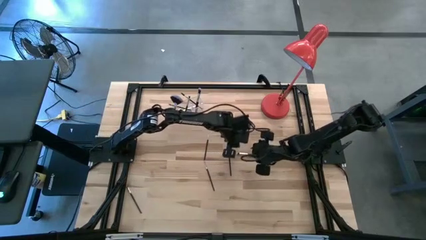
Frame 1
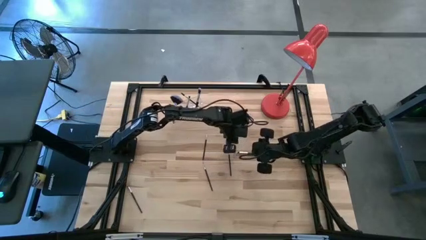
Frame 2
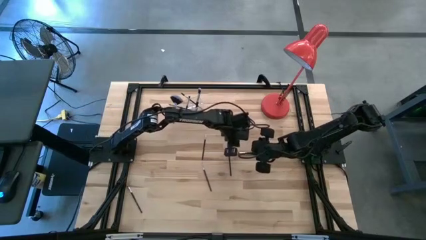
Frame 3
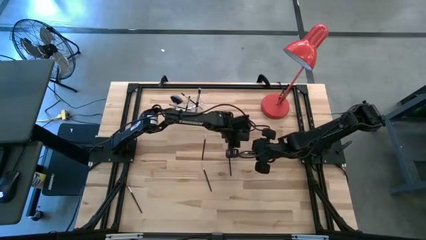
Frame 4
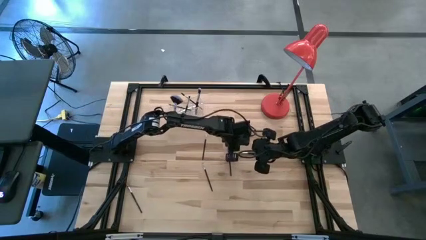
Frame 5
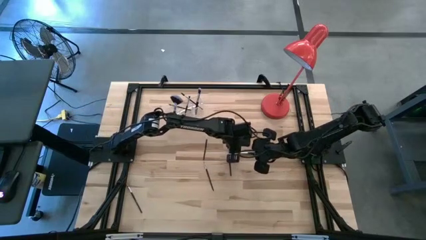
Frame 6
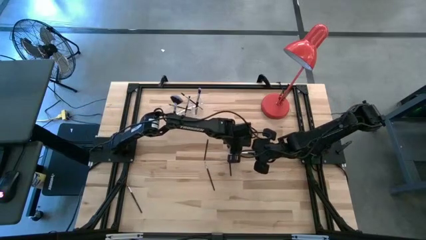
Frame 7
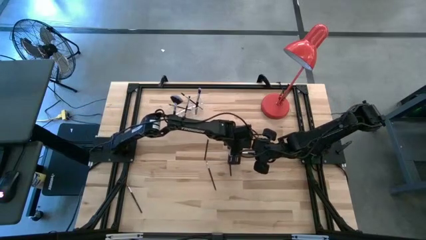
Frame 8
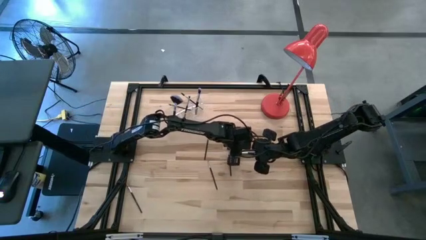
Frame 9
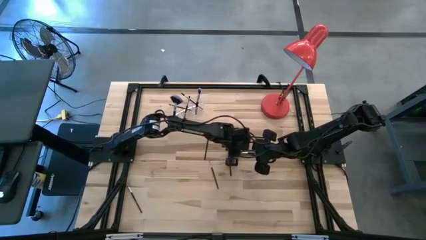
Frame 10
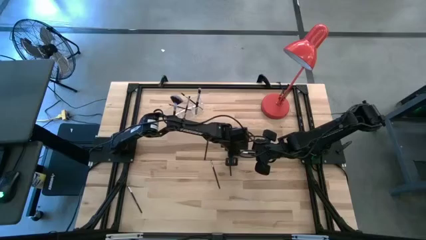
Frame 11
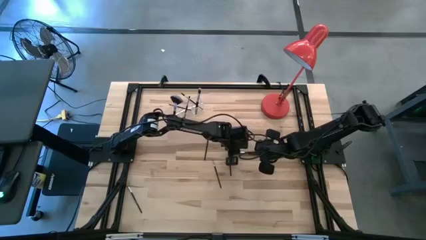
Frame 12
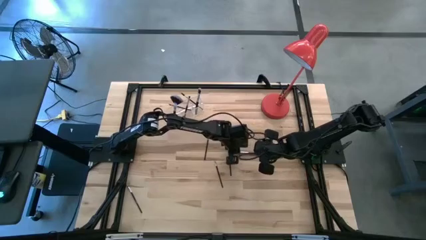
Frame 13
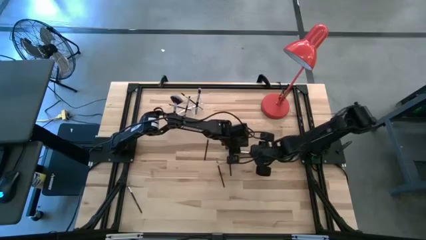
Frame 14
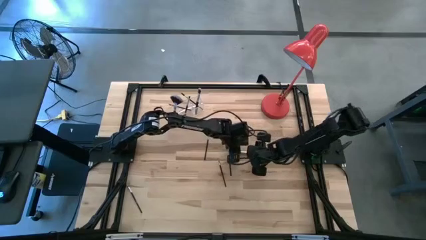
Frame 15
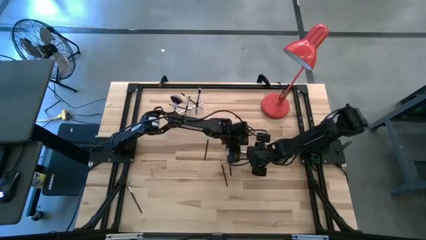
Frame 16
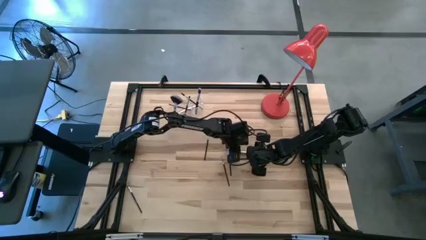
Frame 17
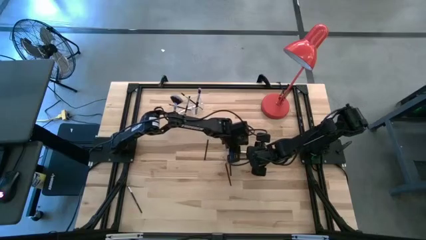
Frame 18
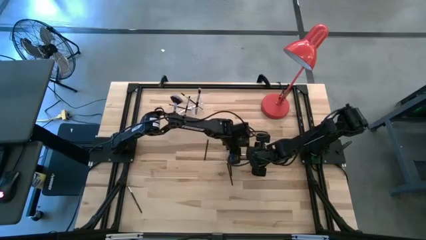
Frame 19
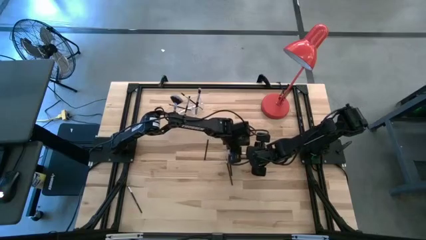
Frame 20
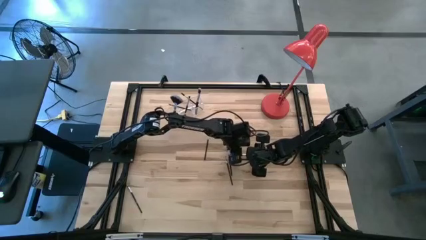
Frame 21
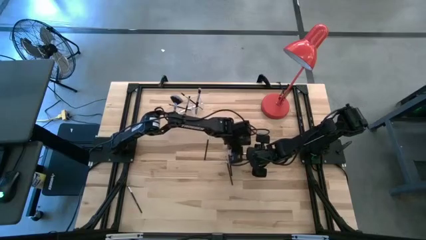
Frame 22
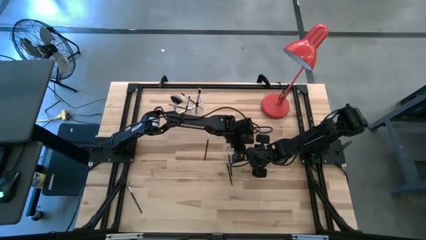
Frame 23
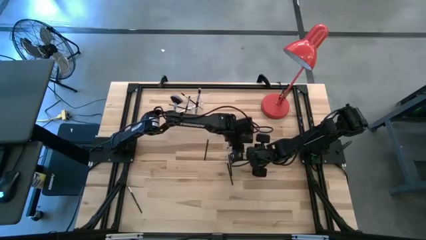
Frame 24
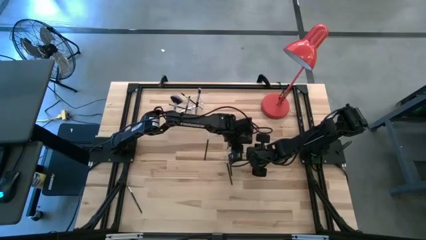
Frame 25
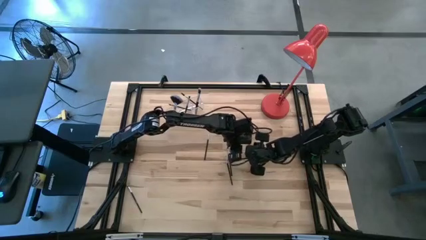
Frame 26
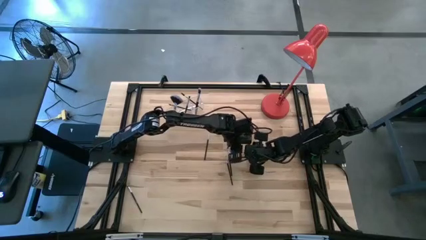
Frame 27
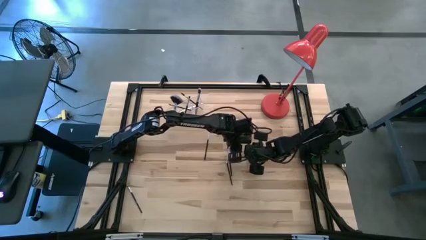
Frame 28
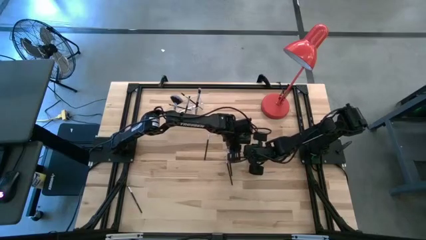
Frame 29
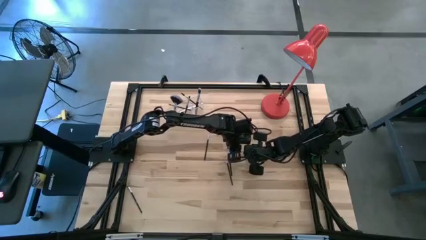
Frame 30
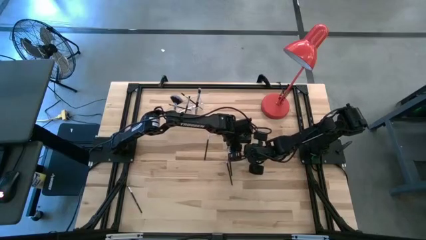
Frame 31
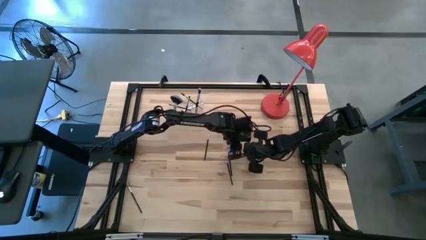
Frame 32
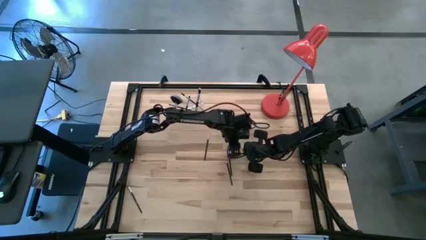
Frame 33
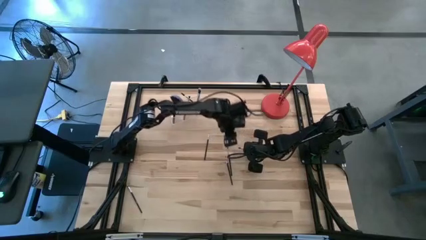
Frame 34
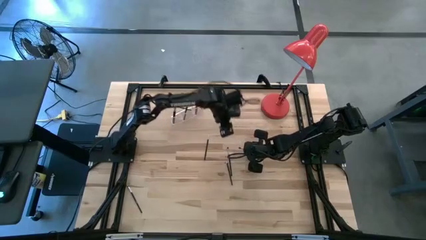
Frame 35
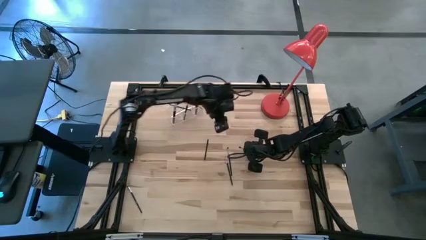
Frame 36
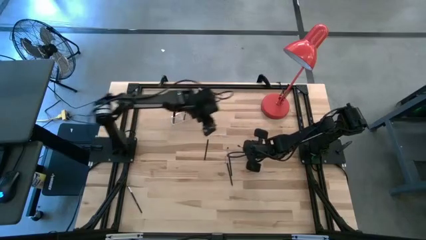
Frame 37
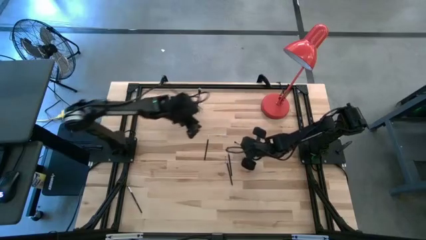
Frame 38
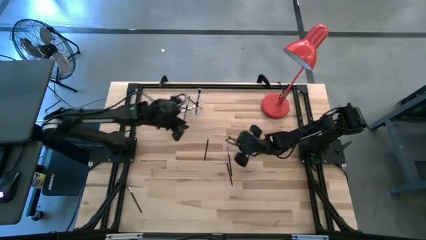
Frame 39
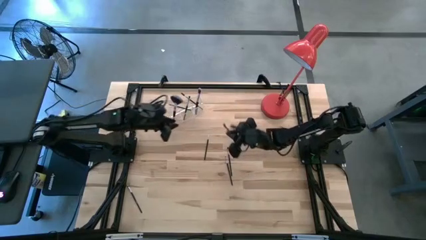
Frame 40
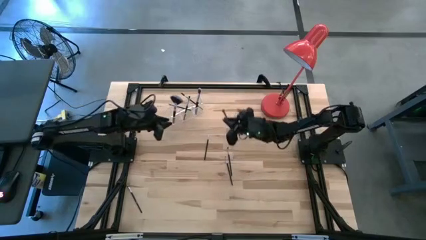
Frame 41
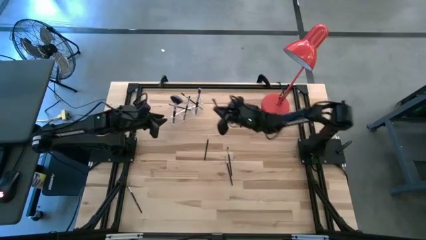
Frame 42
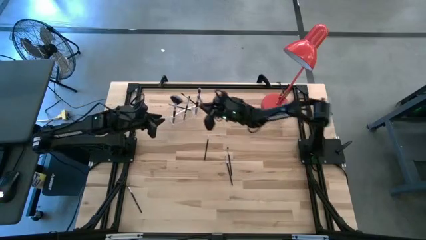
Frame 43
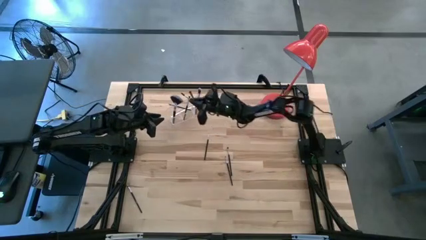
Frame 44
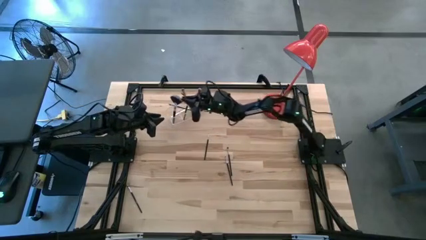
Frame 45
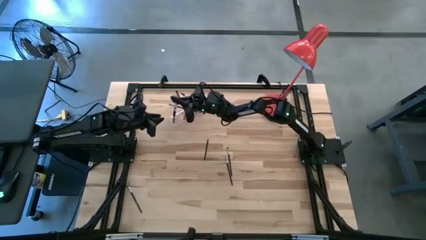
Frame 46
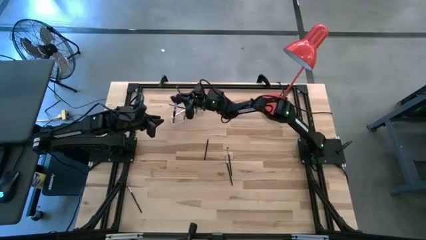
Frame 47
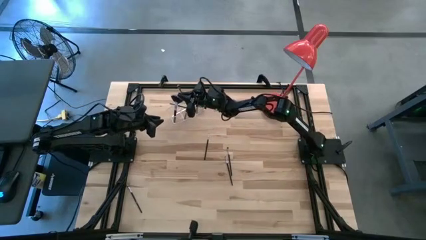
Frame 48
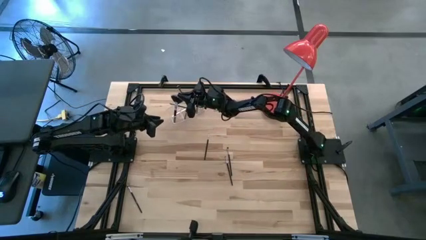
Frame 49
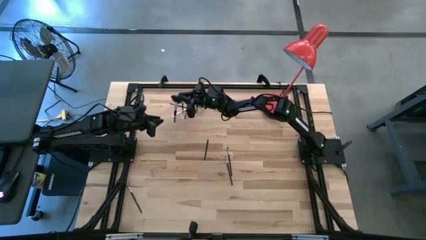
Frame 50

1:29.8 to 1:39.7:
Task: Put items in baskets/containers
Put the eyeshadow brush into the transparent organizer

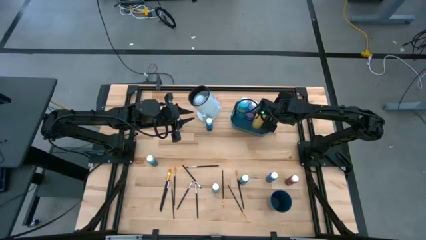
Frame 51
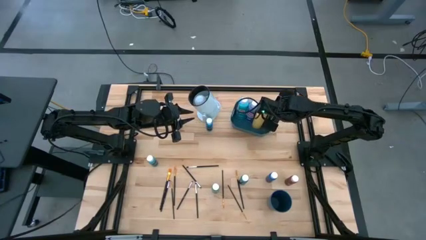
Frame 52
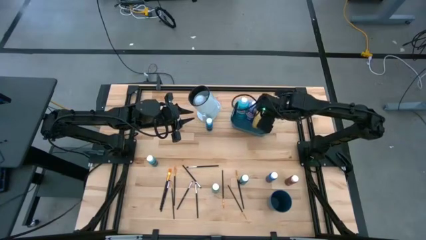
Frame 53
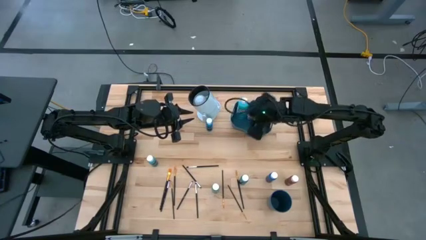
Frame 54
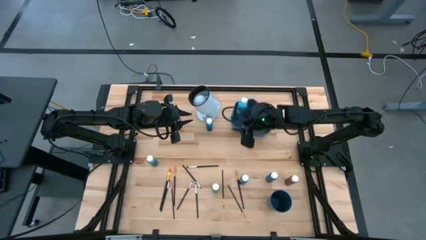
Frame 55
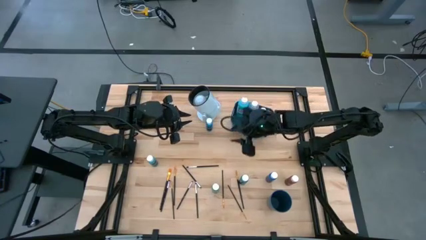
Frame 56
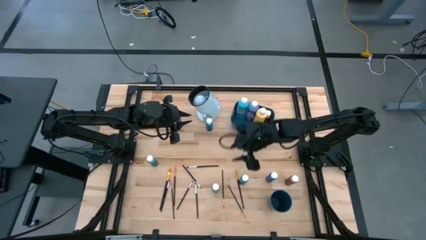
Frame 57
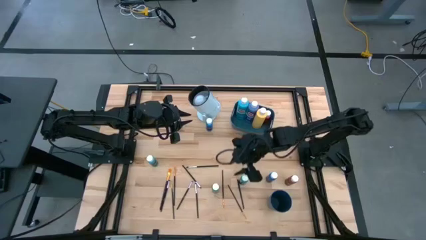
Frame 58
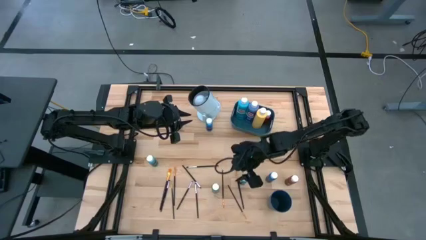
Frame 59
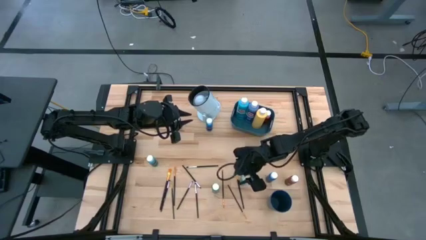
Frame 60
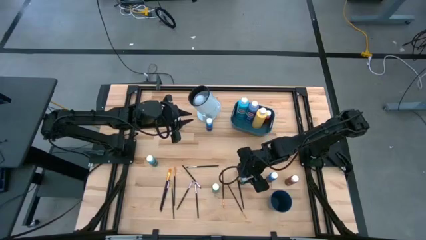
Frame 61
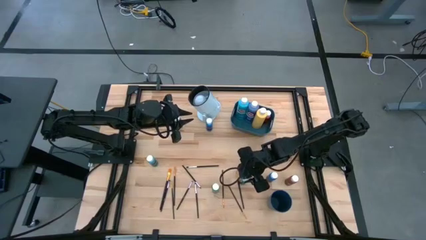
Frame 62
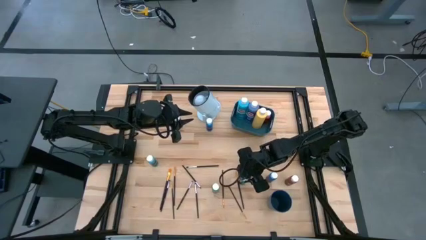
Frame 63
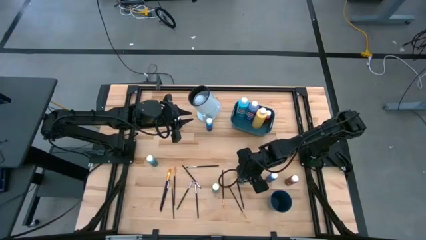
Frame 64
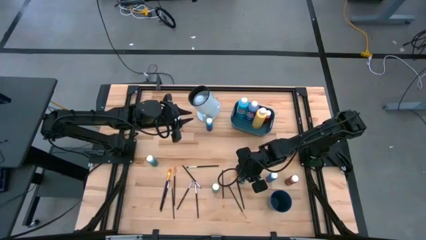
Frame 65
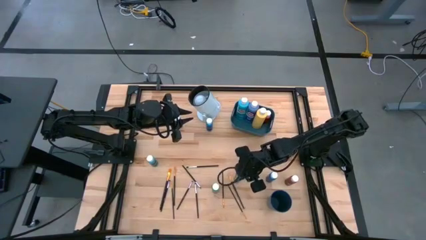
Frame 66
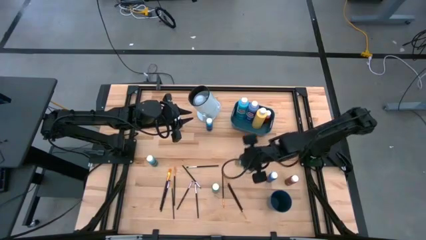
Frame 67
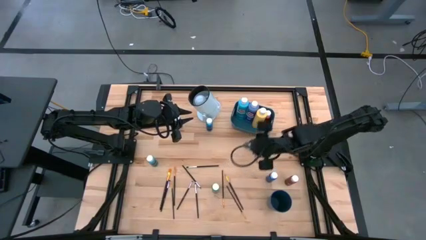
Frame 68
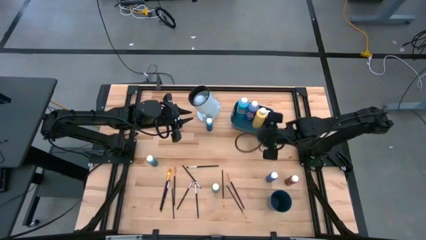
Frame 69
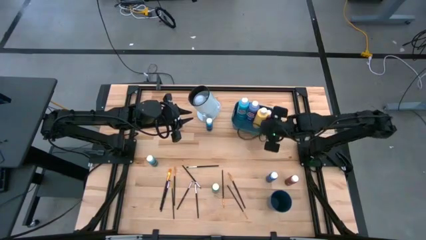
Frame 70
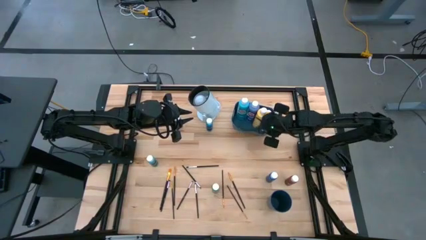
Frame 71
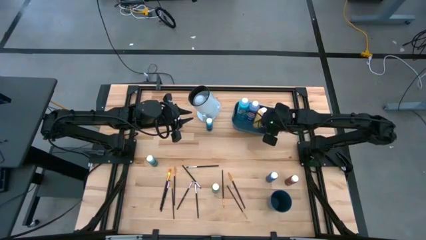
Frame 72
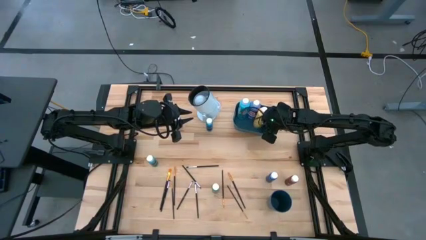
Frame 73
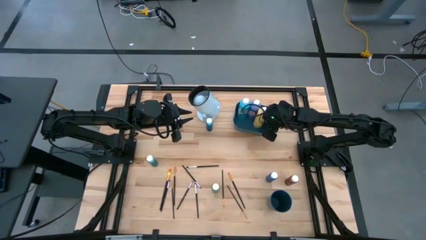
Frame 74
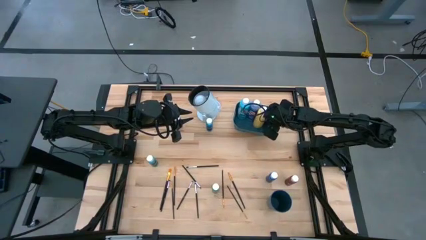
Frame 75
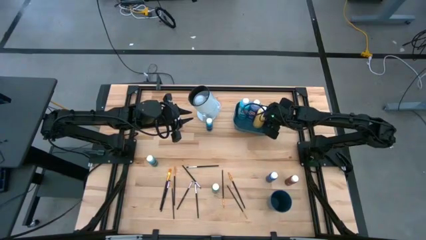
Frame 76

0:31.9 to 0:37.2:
Task: Pick & Place Paint Supplies
Put the dark green paint bottle into the blue bin

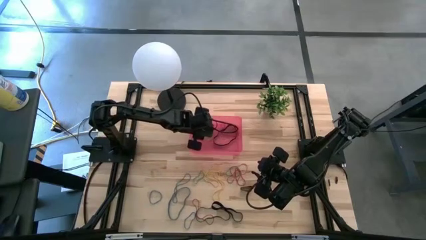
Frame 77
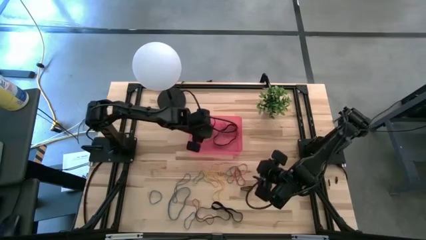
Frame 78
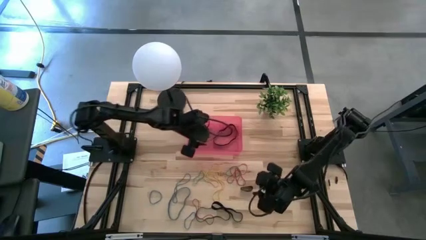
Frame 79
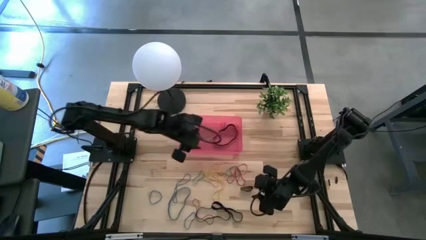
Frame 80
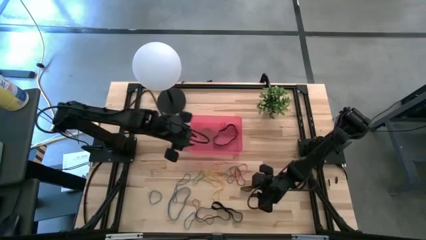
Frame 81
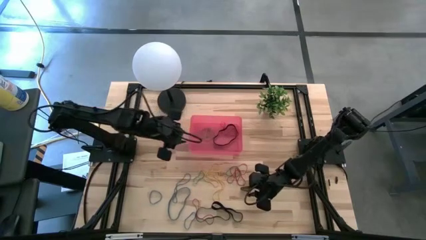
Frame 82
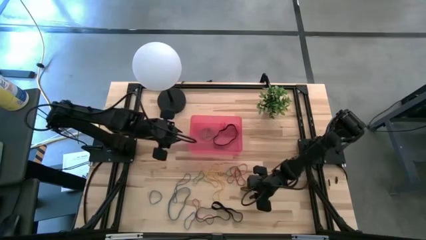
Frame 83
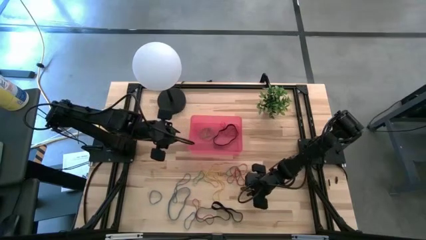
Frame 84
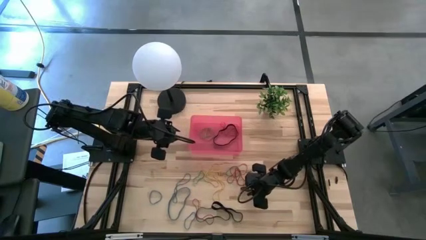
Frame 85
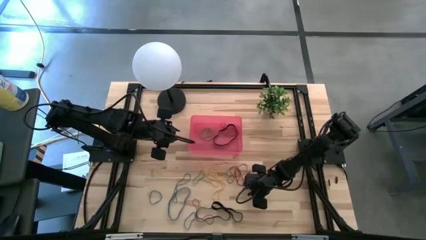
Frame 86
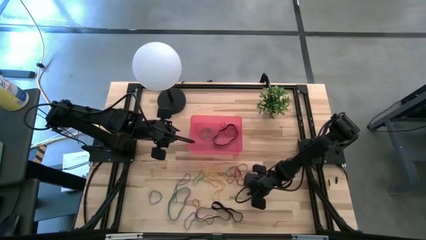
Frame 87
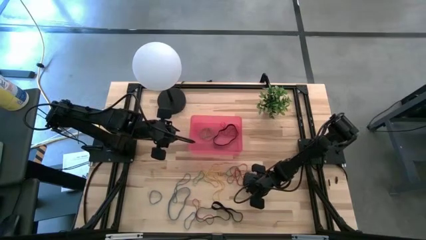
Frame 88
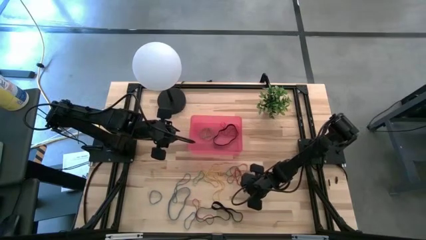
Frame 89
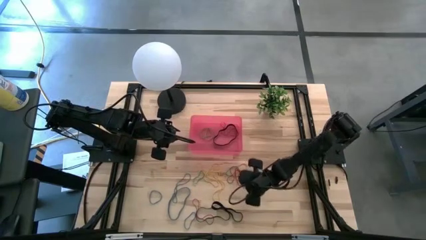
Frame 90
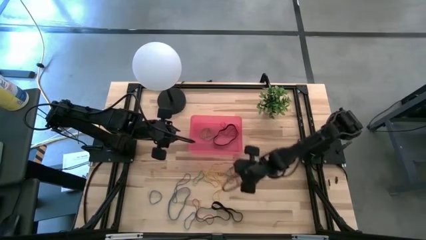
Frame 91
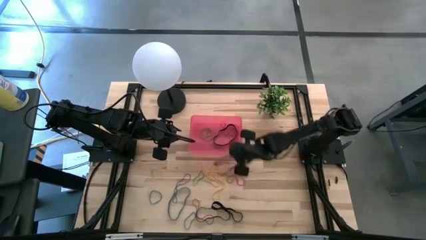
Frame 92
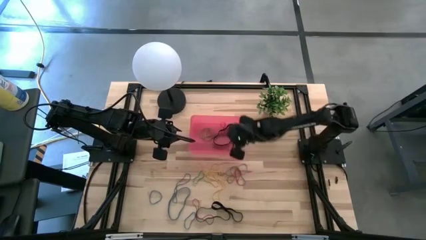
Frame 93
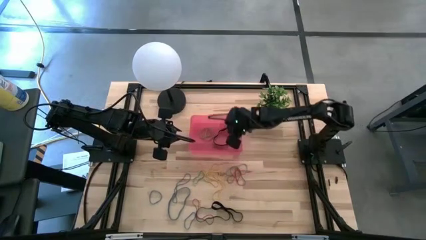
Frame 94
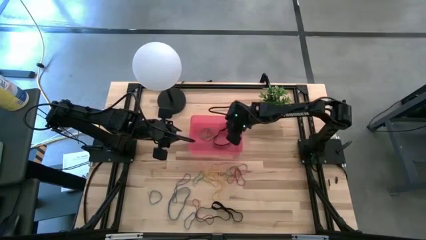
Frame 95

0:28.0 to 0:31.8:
Task: Pick and place rubber bands into bin
Put the black rubber band into the red bin
